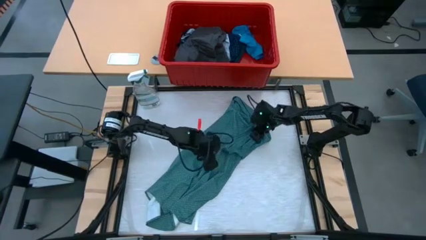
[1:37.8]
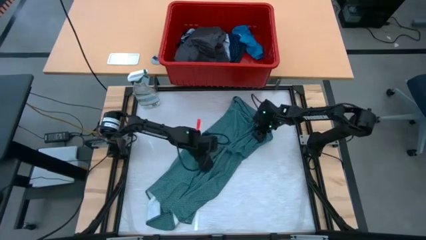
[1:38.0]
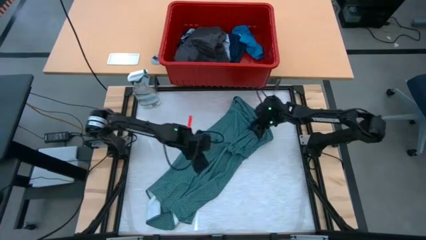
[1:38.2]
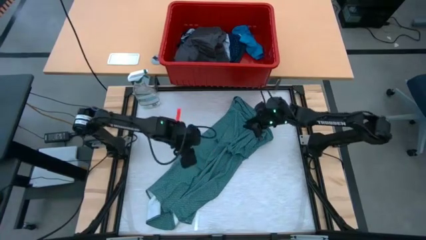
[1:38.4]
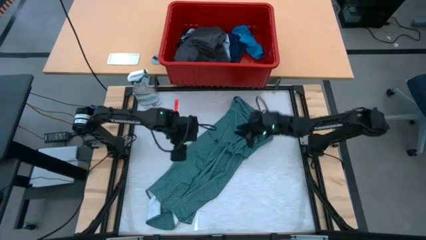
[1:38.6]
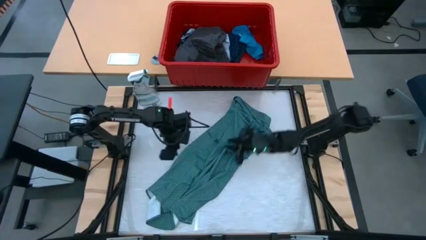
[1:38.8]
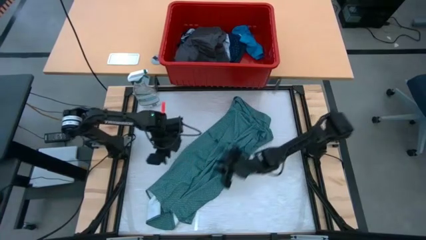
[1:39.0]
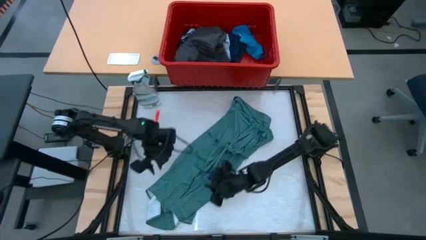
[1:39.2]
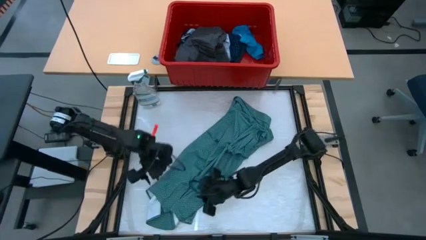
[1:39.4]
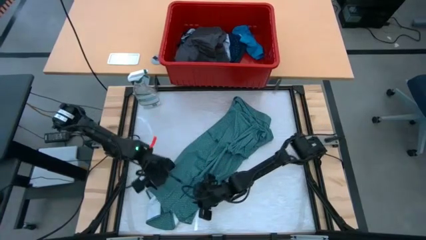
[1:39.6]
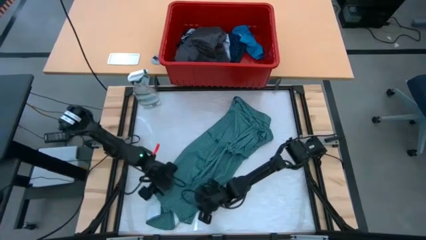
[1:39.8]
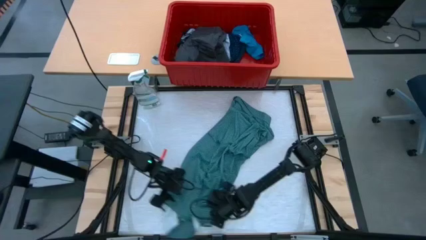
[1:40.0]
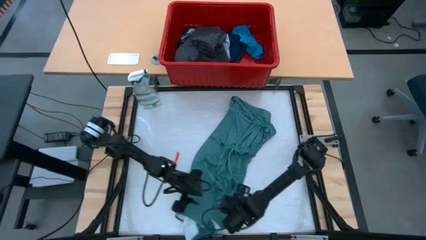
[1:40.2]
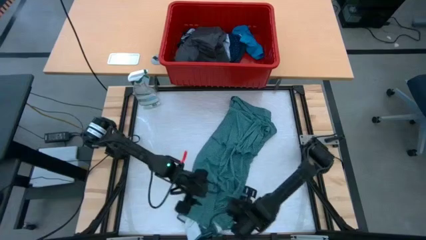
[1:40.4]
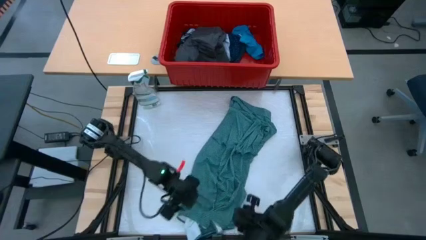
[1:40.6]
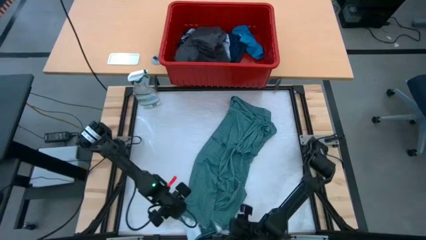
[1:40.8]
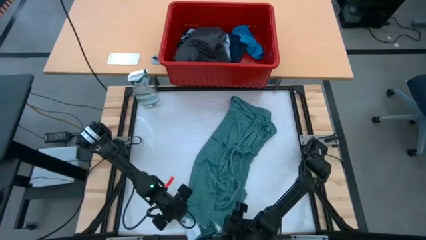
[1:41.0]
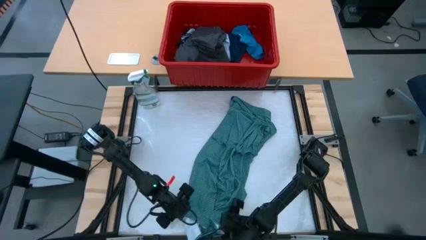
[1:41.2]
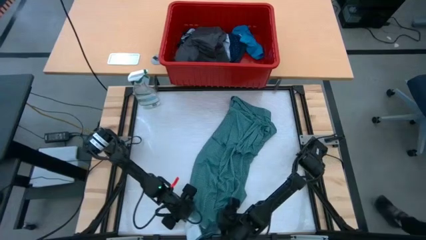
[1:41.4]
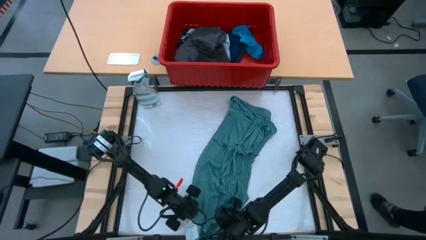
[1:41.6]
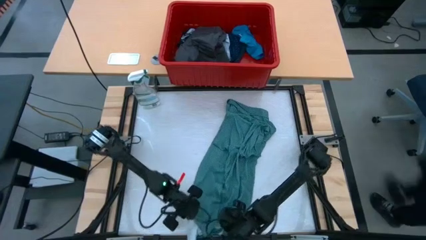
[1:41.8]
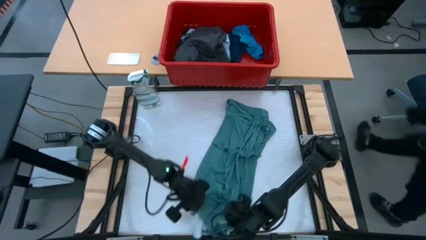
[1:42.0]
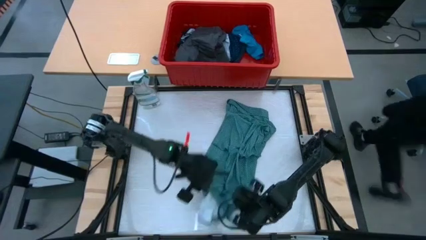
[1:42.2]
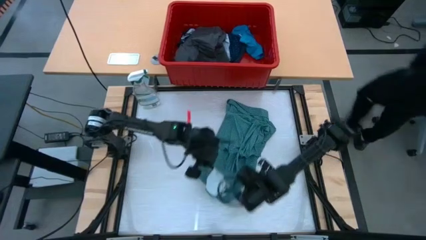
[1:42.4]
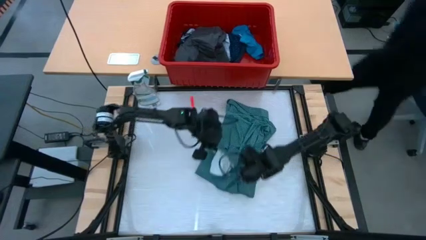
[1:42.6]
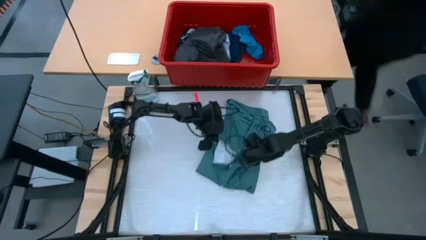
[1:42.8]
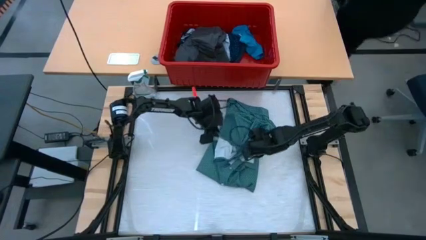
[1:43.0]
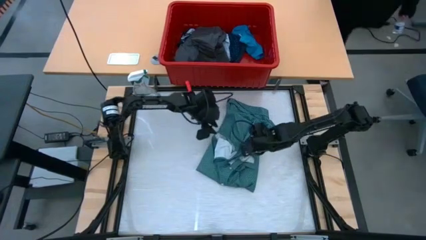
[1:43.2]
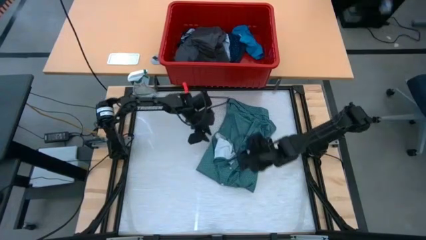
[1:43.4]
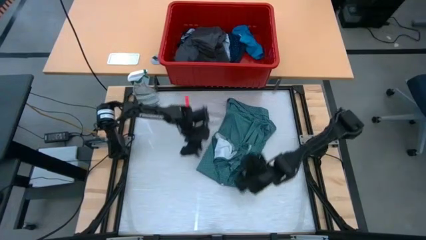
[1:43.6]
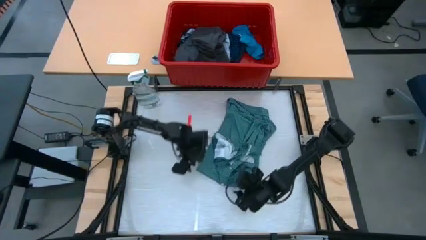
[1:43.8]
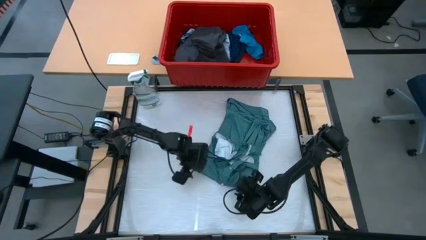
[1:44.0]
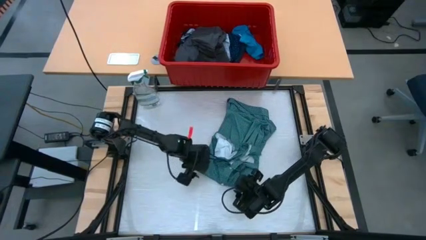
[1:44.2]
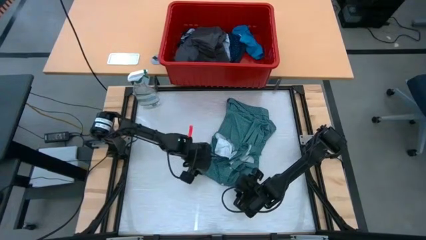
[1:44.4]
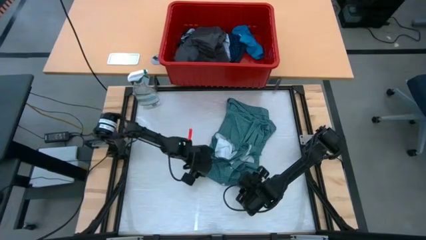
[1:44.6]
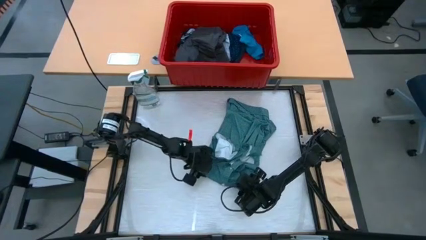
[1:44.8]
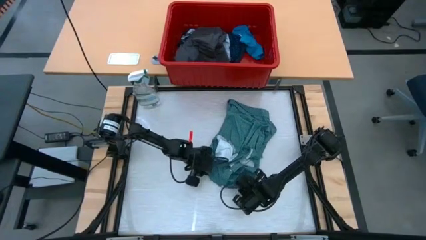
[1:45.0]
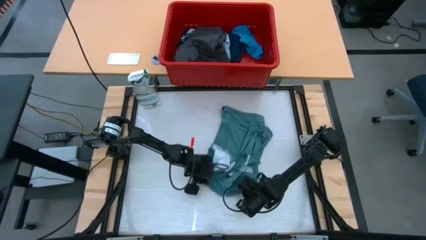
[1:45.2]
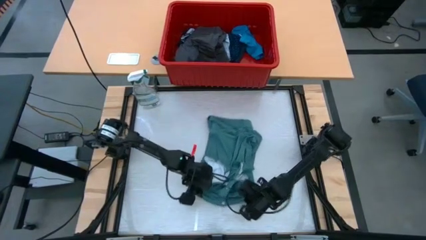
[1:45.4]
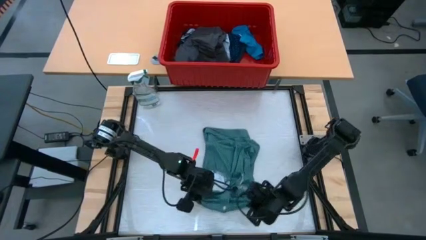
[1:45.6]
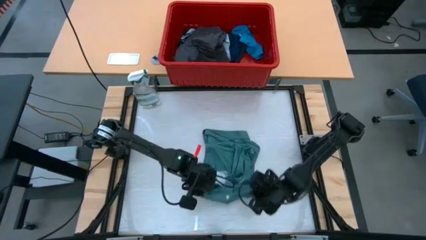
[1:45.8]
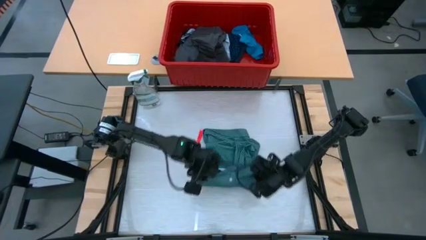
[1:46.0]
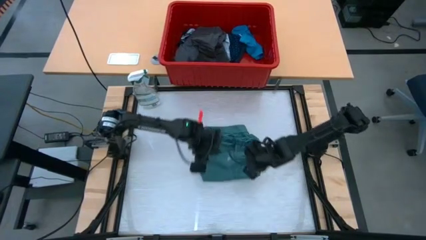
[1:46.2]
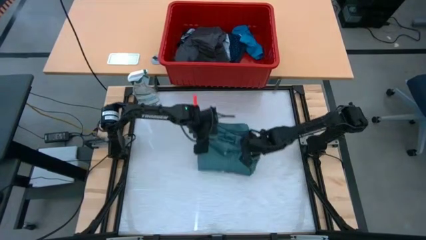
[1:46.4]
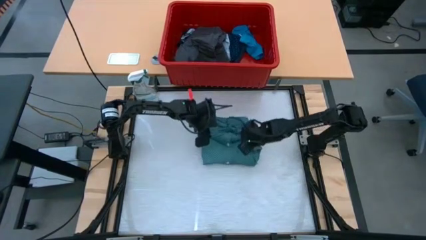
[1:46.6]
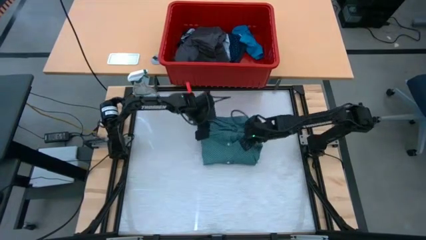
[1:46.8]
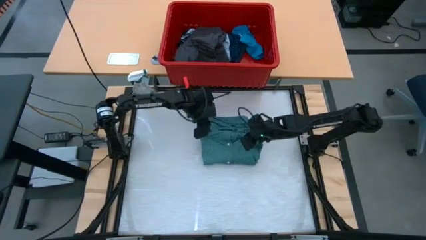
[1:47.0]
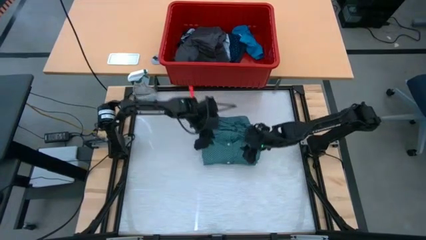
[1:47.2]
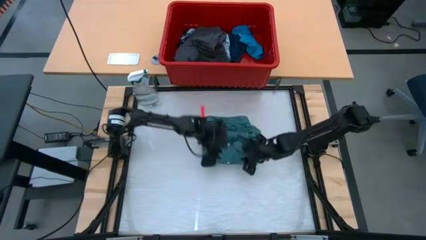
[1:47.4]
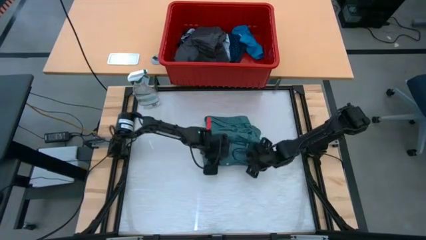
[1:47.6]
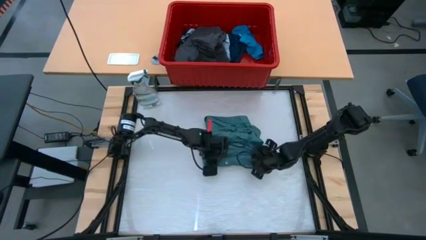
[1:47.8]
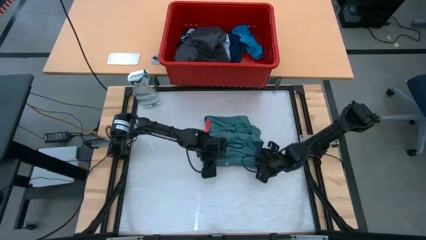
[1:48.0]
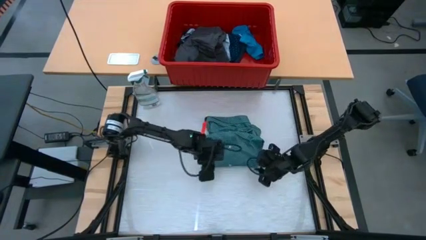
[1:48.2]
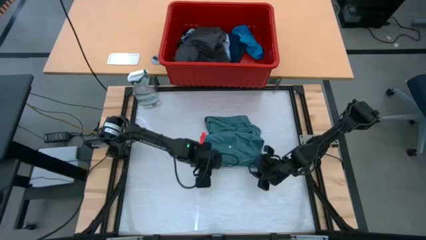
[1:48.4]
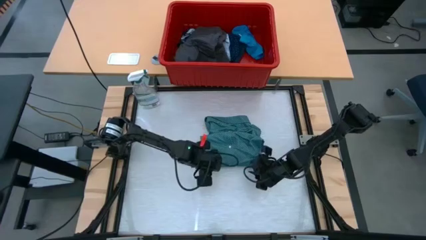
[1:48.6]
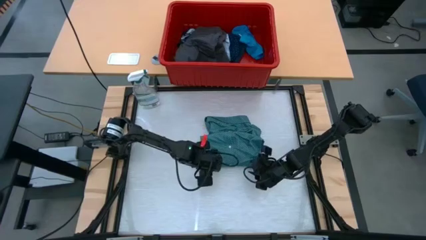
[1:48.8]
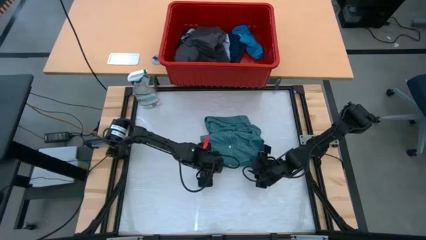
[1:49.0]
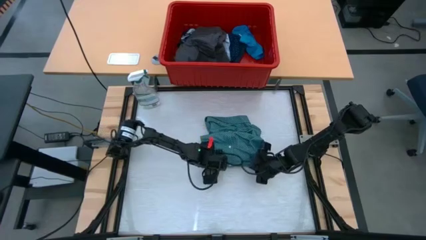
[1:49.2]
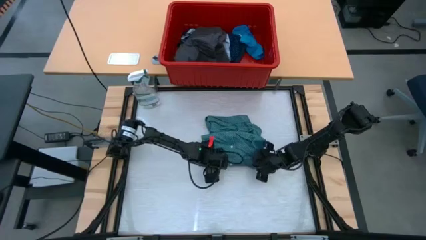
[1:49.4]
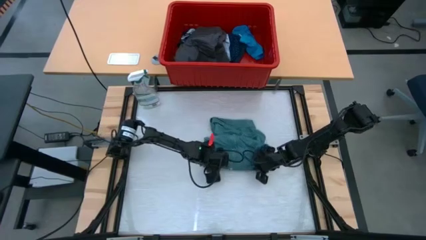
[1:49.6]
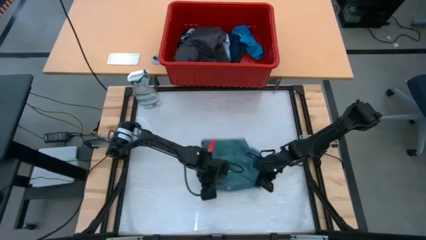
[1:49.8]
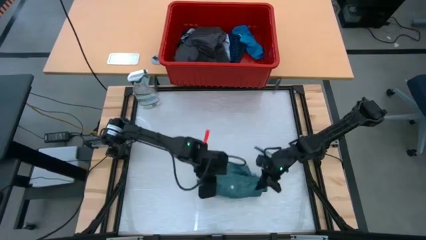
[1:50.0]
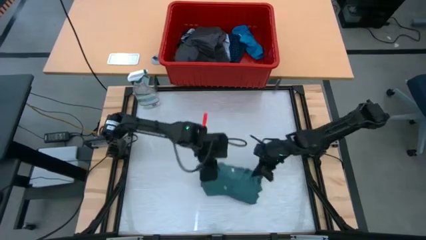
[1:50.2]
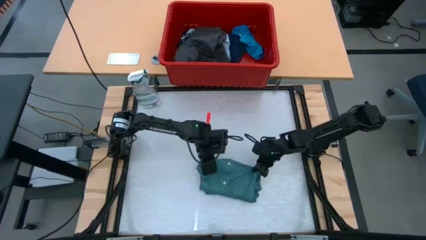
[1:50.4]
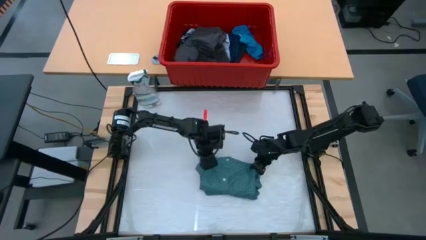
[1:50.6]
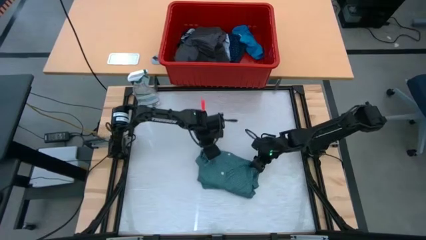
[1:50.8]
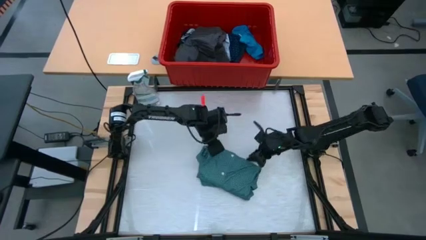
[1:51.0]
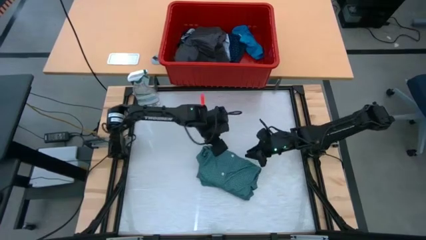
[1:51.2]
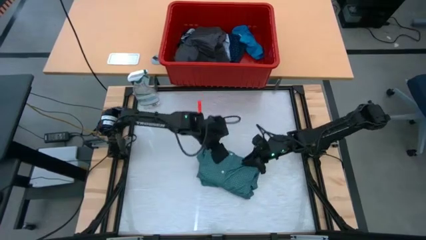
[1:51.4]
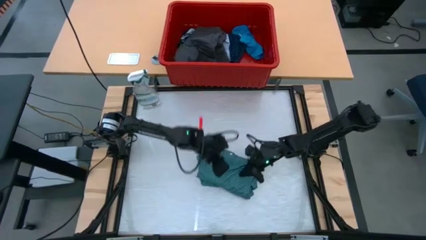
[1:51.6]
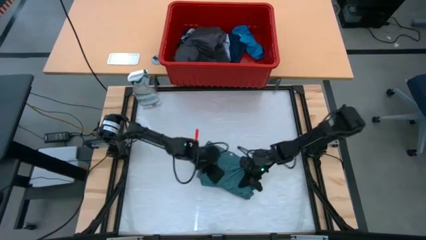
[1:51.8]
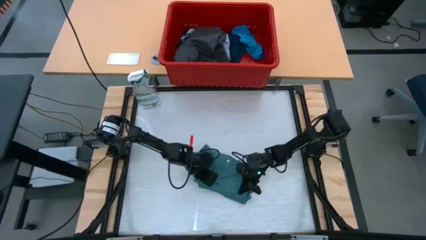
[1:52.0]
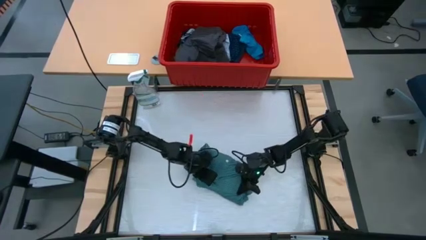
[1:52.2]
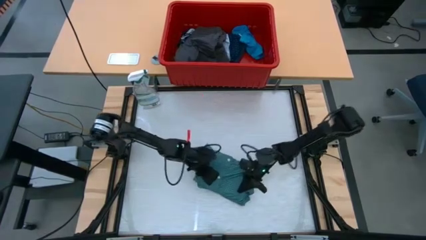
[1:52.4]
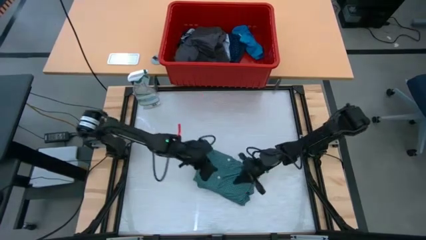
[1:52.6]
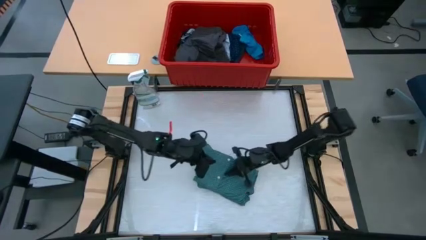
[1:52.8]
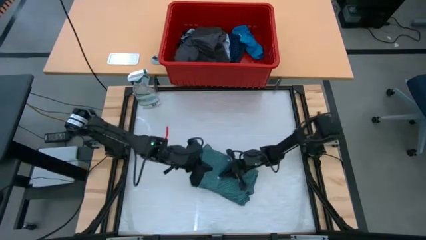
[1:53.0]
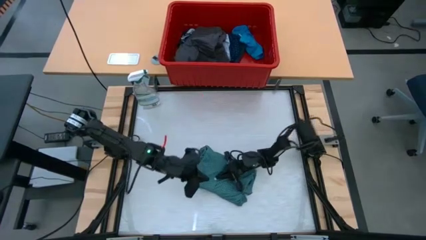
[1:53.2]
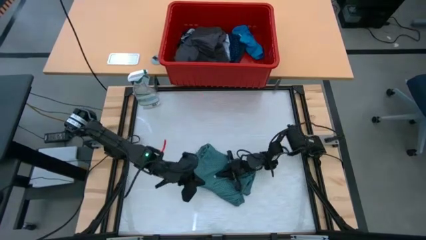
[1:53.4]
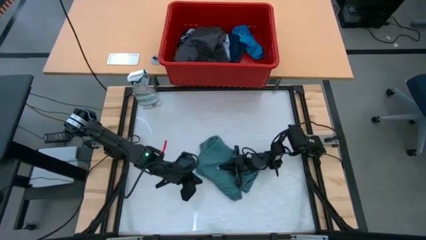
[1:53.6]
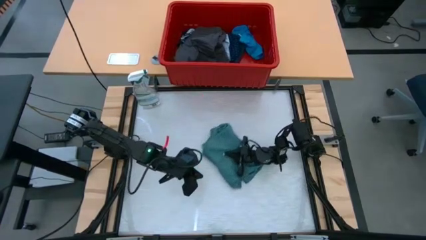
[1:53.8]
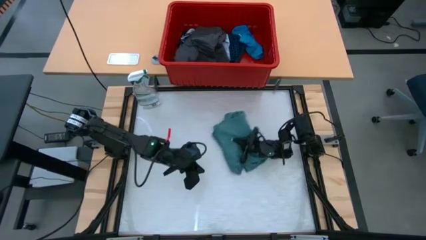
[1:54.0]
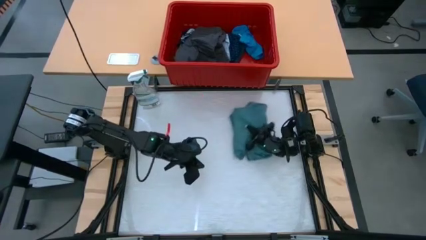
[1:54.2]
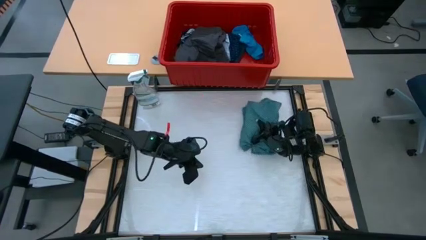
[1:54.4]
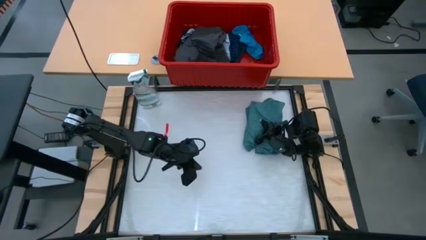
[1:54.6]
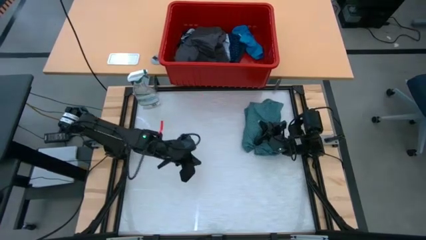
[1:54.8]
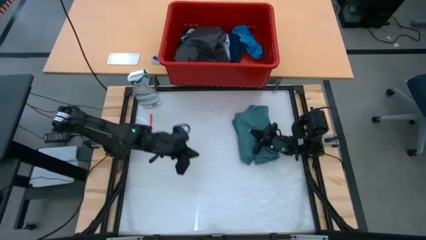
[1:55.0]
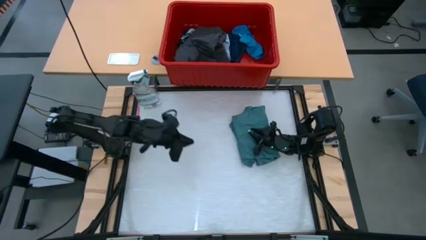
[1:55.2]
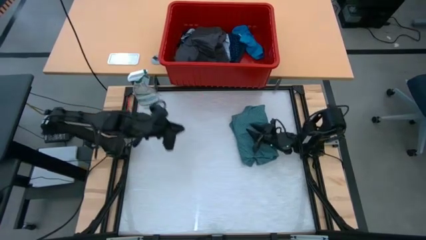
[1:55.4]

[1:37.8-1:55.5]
Task: Fold laundry
Fold the green shirt
